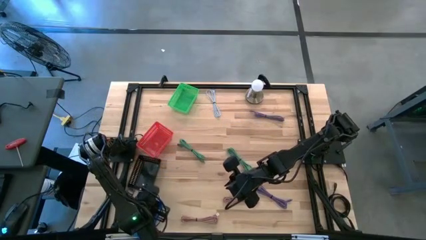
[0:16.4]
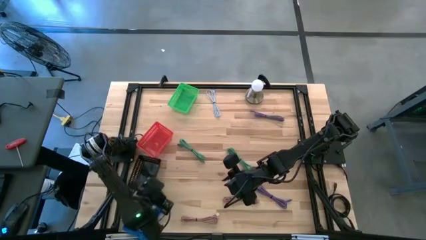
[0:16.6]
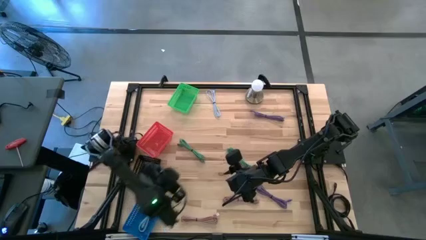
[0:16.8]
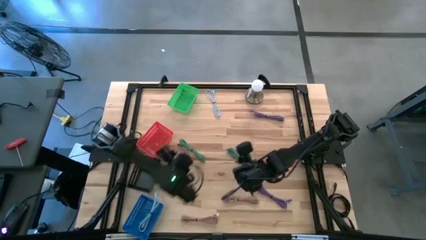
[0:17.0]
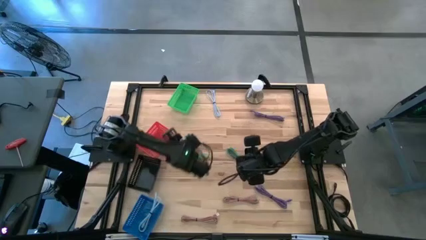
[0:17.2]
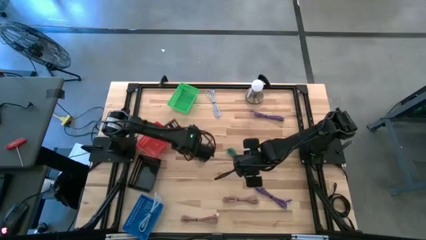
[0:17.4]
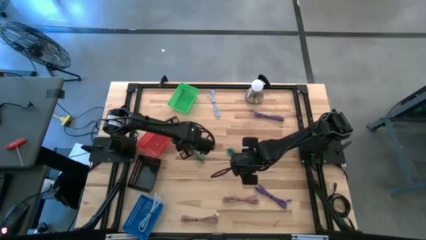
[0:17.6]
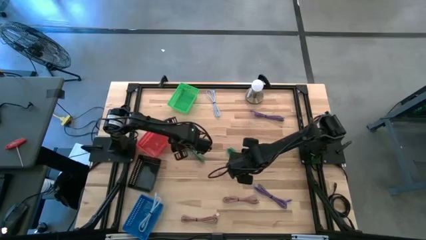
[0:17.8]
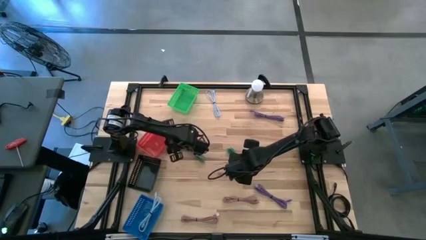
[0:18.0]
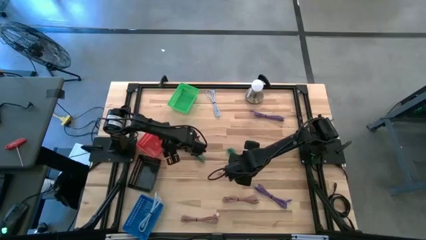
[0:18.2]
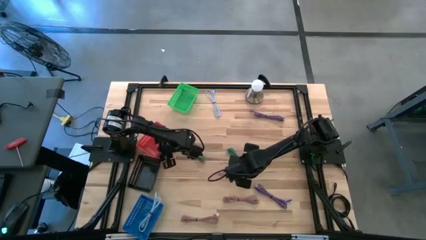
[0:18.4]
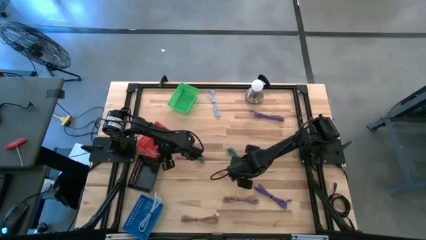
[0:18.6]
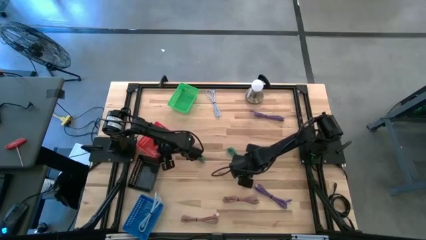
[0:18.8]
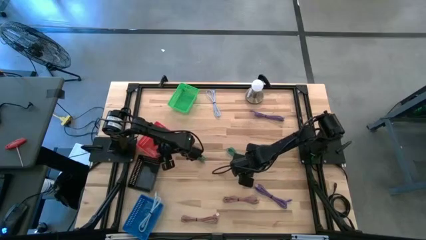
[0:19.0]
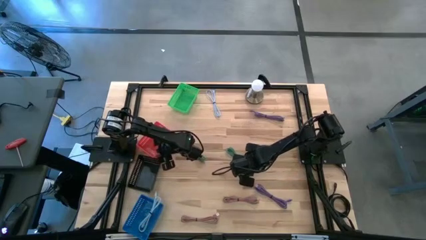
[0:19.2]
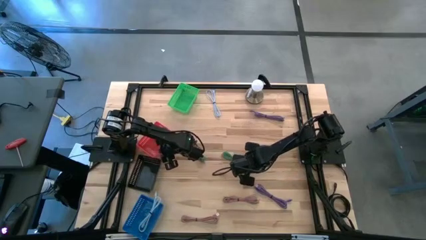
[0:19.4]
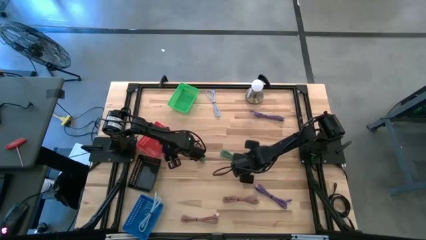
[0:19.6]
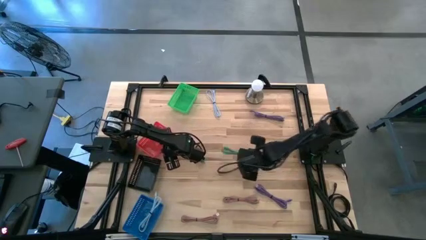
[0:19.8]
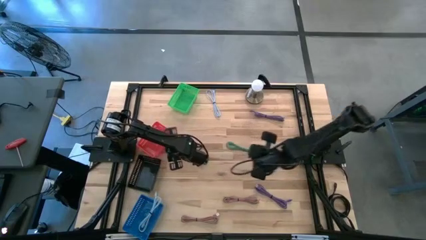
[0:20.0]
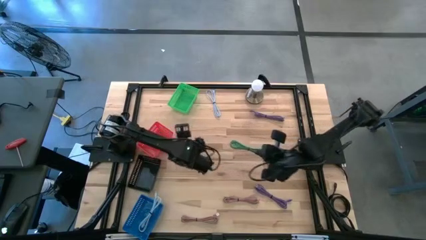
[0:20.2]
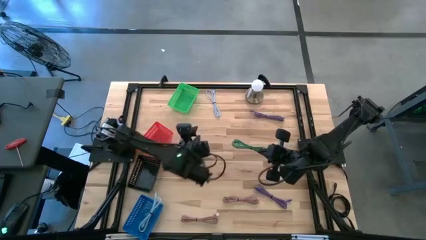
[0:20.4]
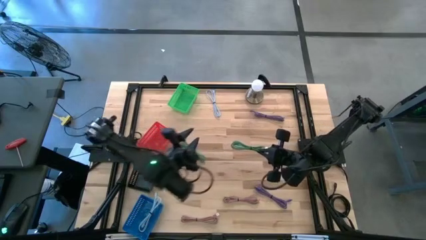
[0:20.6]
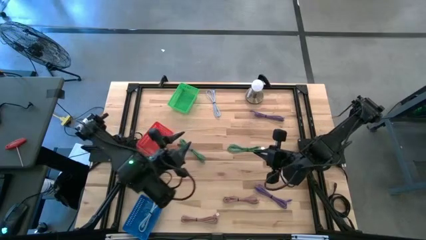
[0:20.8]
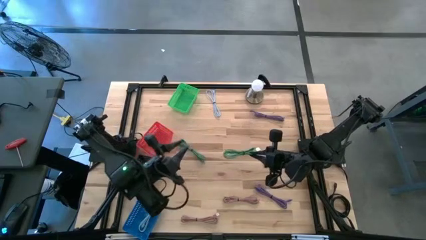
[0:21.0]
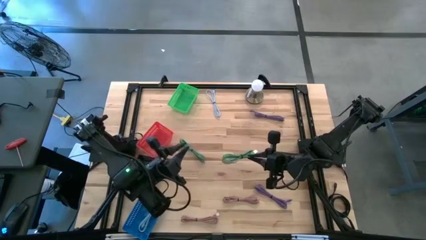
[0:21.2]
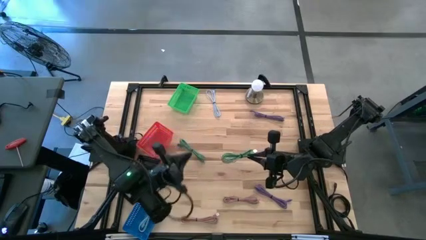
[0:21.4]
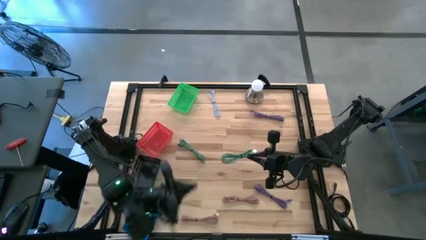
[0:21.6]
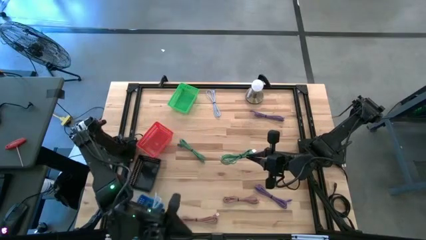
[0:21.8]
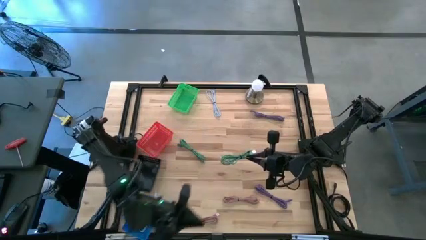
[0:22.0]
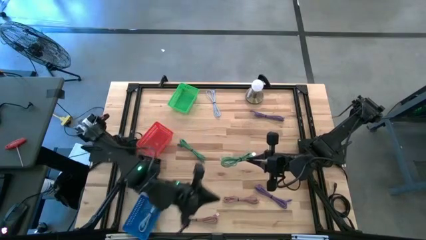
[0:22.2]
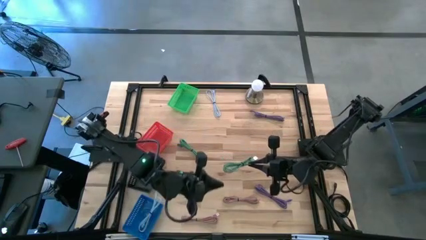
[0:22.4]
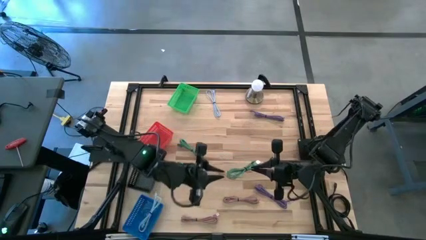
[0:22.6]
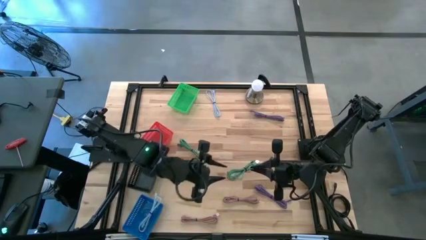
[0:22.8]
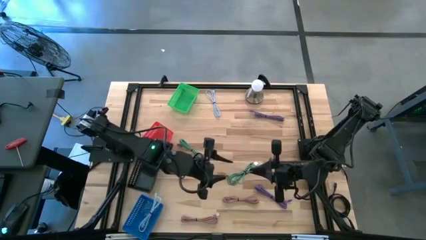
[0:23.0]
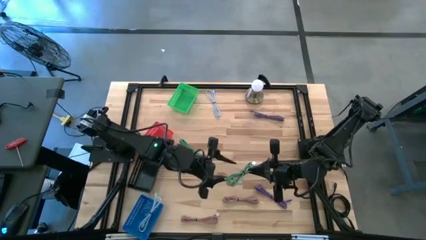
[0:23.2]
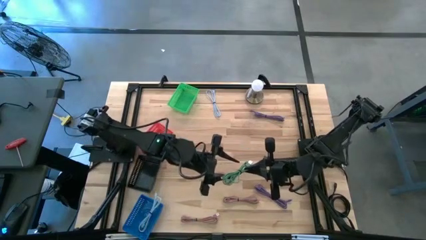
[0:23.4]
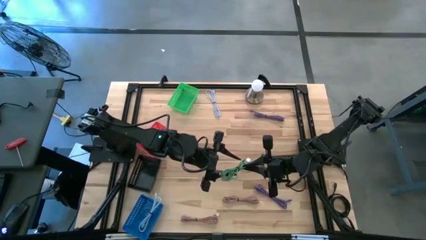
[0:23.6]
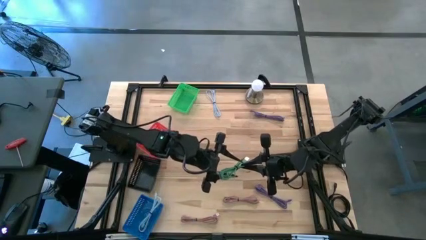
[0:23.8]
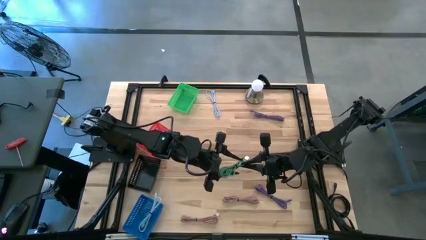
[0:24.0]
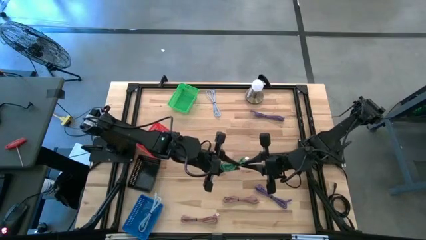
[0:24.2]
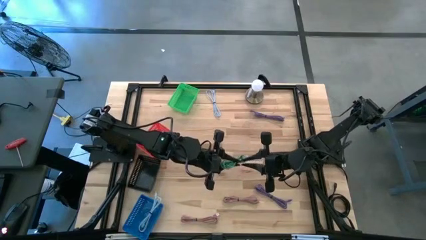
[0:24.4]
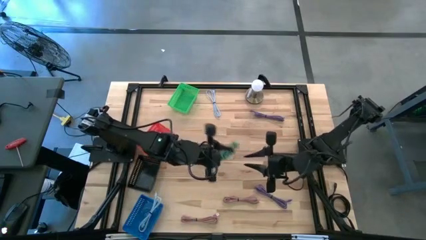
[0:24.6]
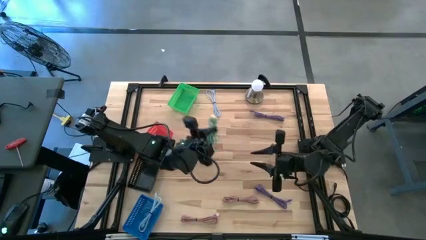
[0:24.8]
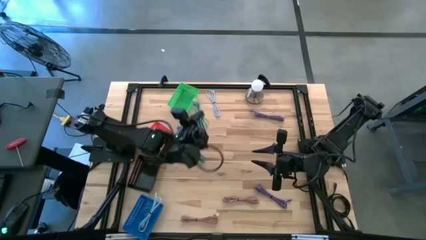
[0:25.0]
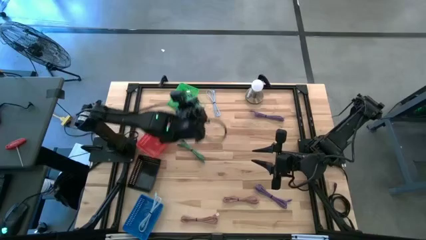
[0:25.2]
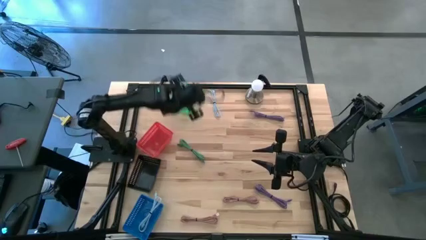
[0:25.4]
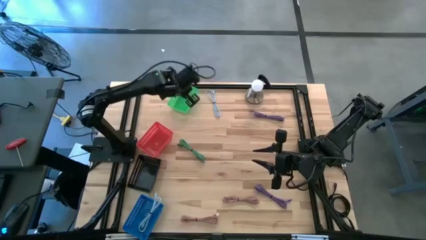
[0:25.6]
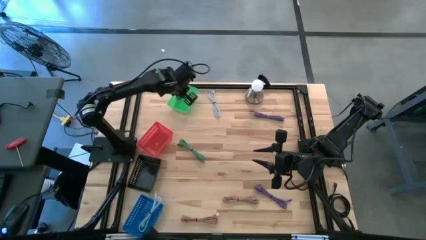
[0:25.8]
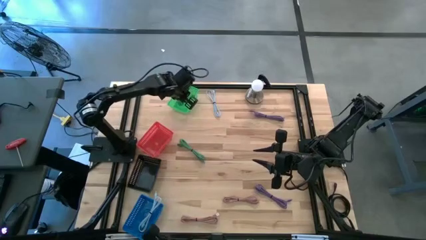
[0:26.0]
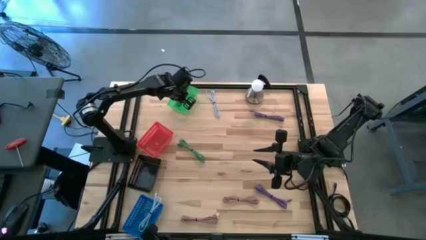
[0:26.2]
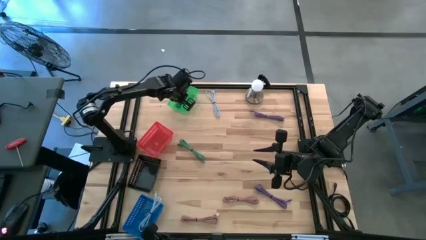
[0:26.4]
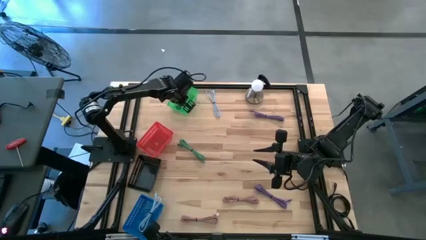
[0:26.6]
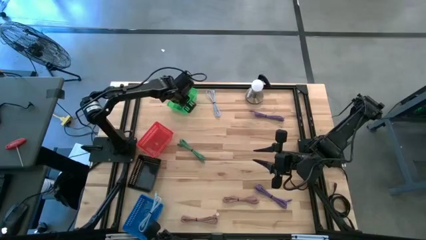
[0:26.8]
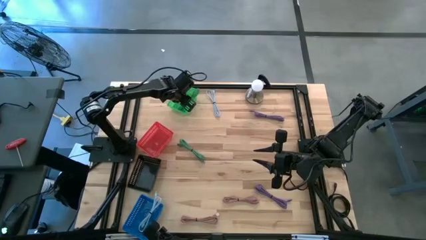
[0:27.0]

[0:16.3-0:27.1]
Task: Pick & Place USB Port
Put the right green charger cable into the green bin
